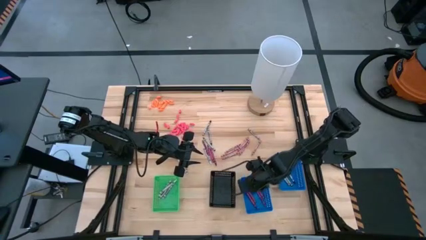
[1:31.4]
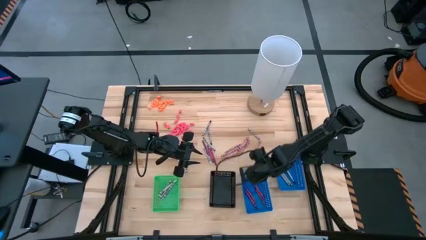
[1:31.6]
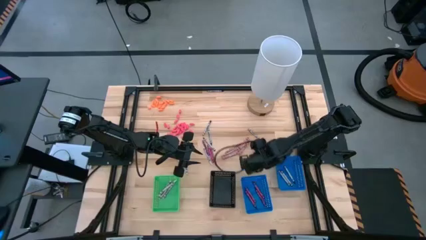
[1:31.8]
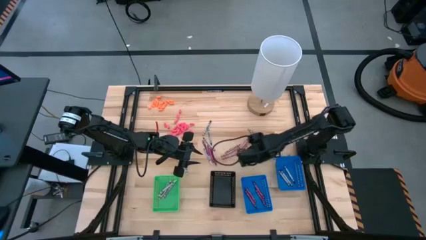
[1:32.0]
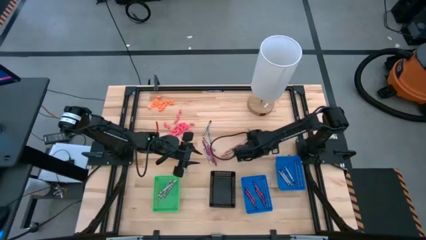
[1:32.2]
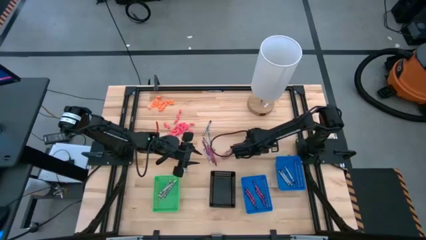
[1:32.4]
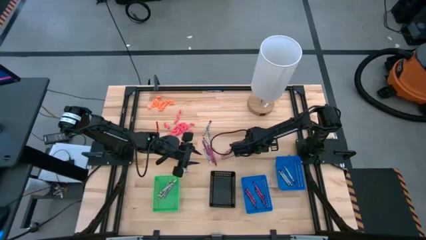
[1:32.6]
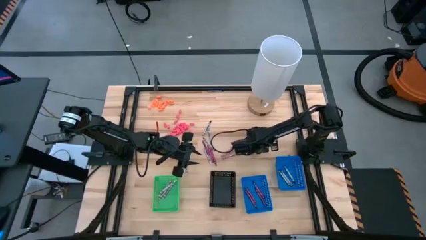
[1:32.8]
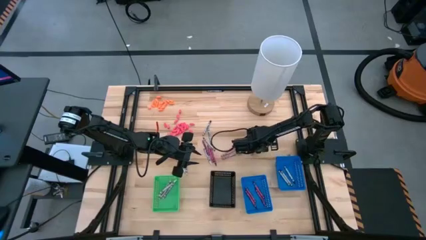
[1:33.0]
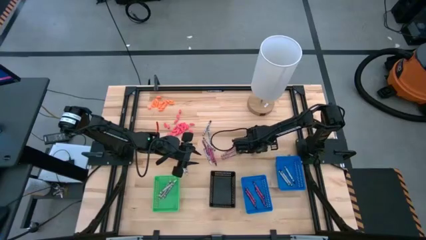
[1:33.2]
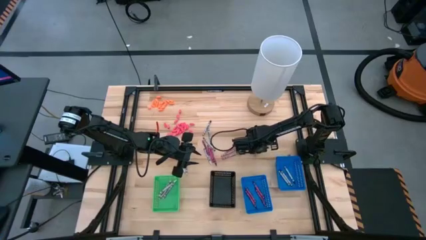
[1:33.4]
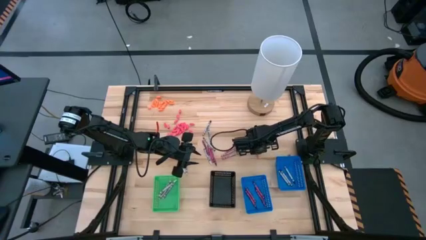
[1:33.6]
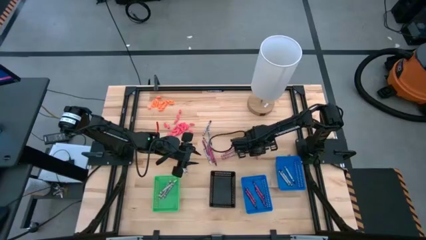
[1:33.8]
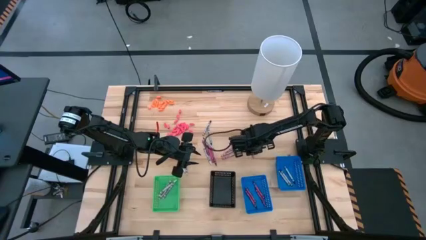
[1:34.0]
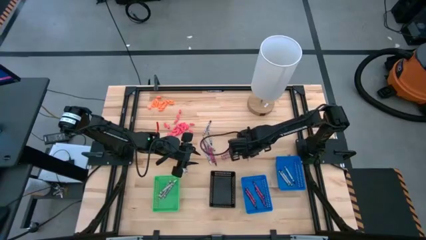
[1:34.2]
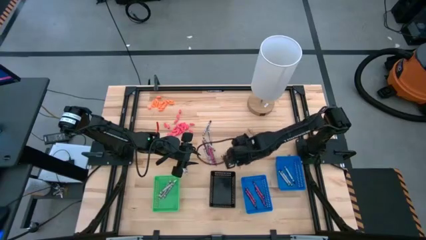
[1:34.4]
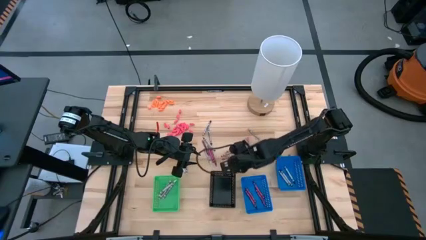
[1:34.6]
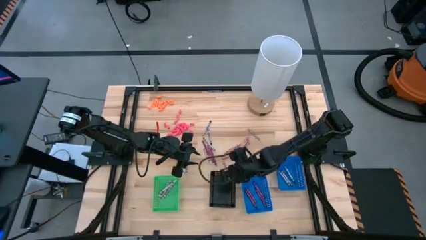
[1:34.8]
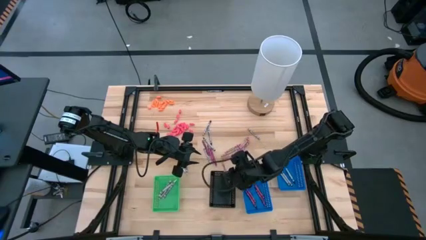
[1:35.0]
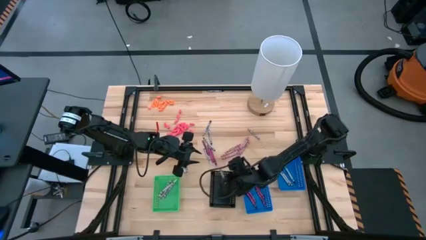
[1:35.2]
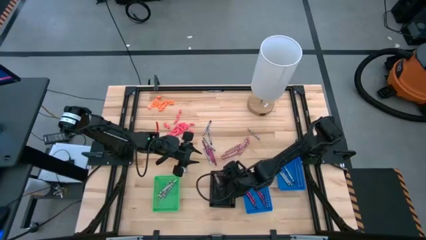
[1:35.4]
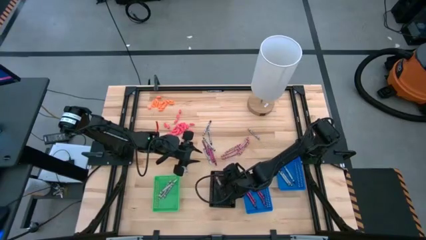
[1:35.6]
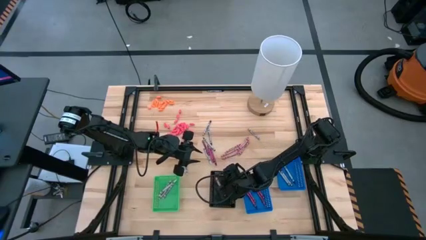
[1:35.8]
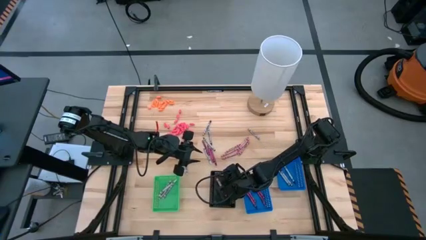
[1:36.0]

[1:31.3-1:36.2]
Task: Sort crayons
Put the pink crayon into the black bin

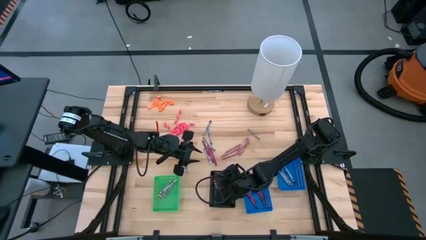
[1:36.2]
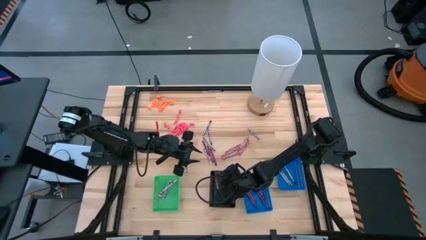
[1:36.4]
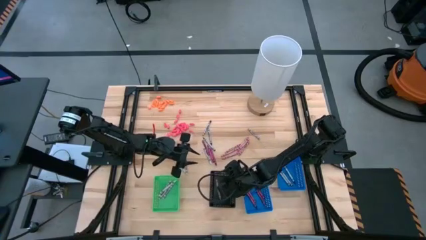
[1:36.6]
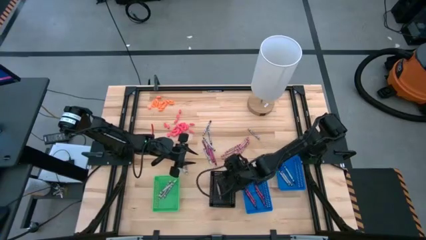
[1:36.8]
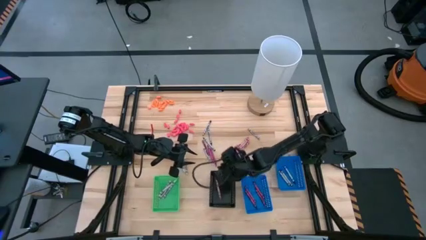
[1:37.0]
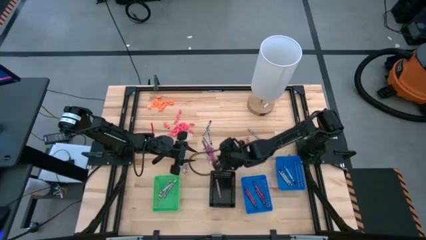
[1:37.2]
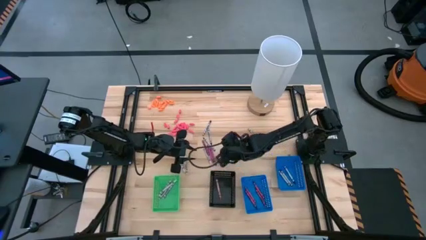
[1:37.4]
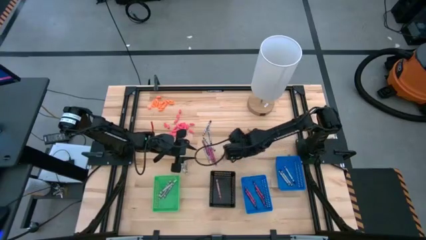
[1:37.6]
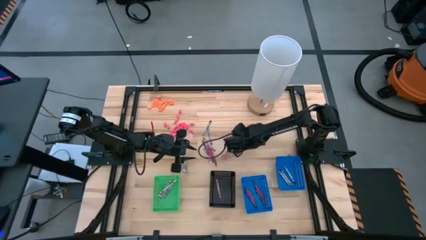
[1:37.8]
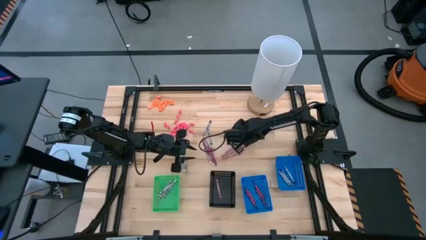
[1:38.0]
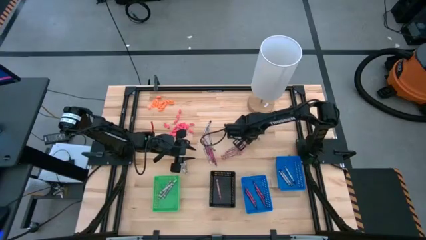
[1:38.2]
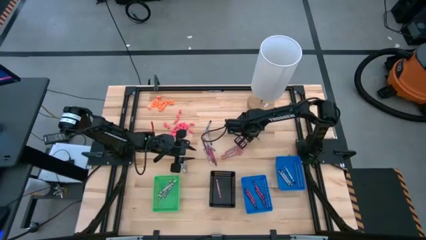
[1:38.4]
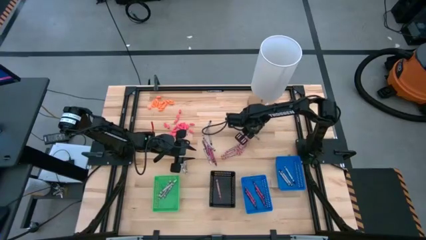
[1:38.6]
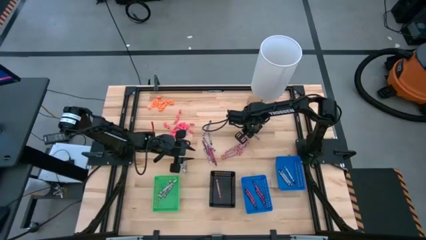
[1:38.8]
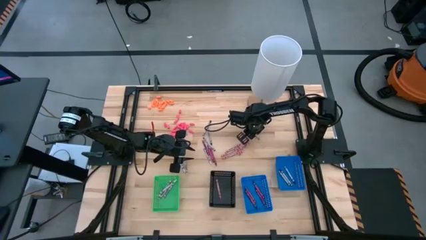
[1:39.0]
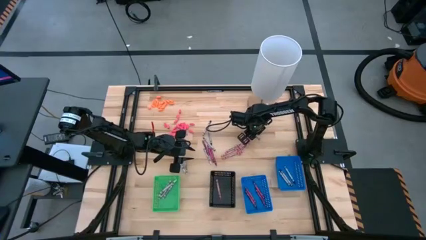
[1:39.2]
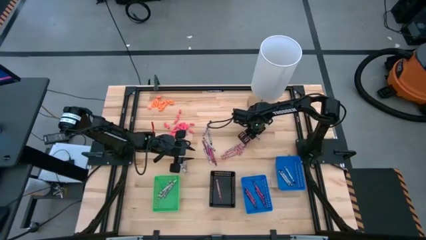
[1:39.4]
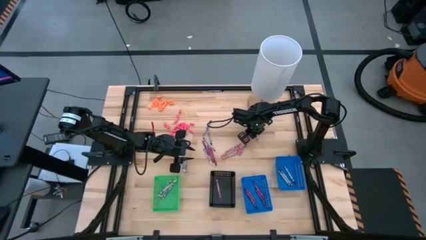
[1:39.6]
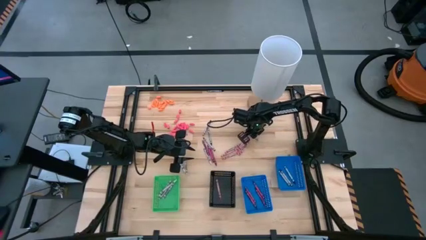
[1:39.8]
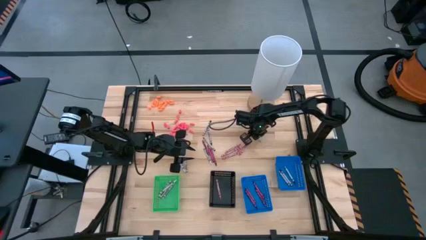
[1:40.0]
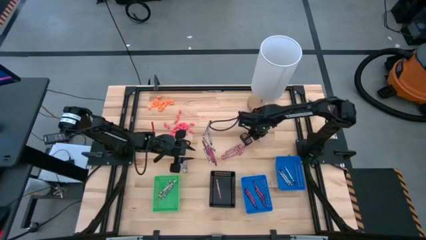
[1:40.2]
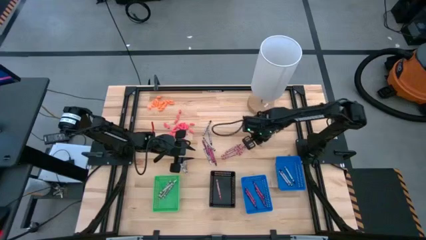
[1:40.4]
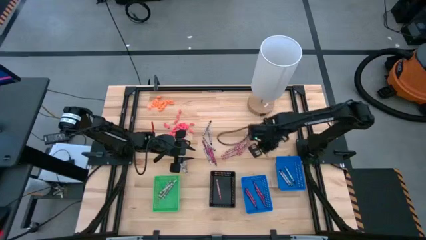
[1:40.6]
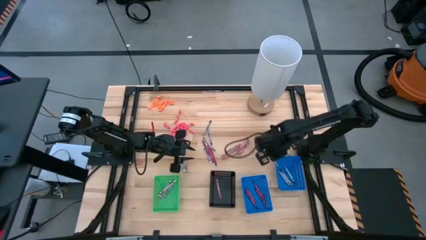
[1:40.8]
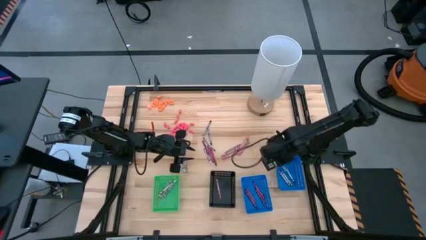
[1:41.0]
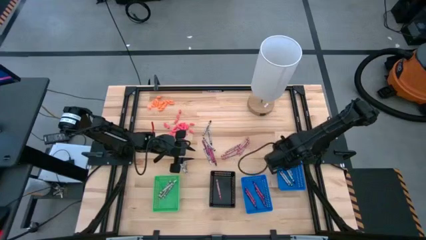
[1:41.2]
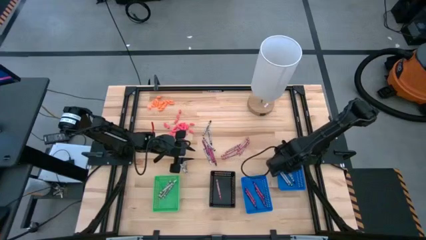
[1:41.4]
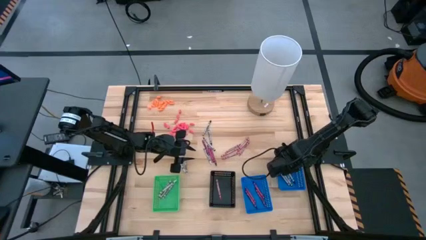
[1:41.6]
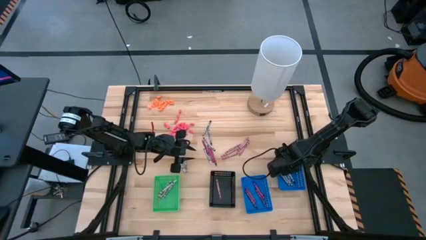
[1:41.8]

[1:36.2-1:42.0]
Put the black crayon into the right blue bin

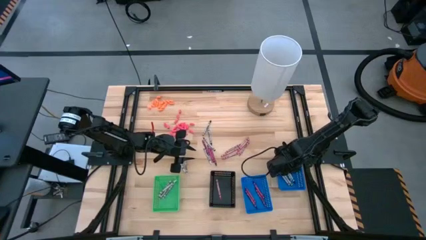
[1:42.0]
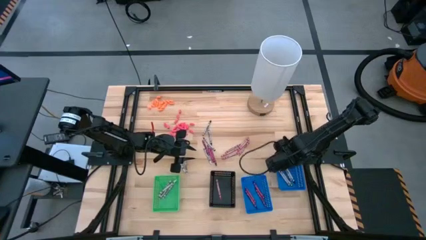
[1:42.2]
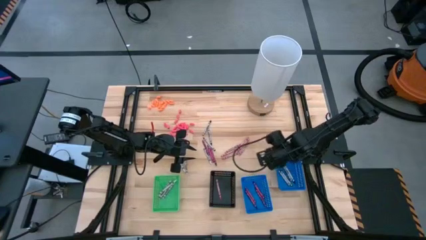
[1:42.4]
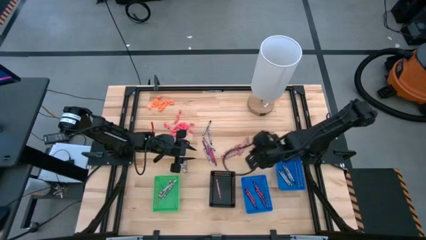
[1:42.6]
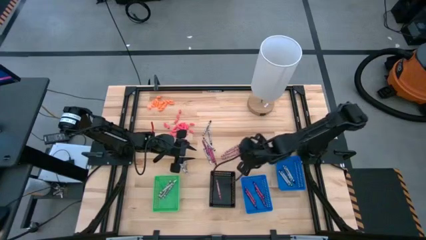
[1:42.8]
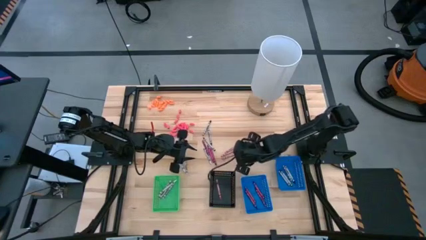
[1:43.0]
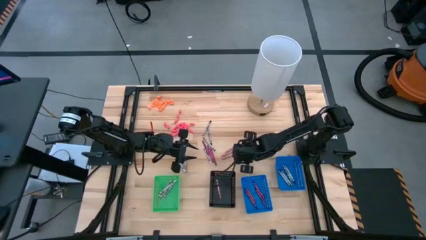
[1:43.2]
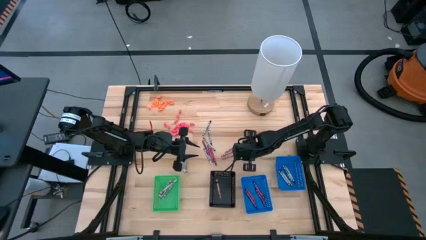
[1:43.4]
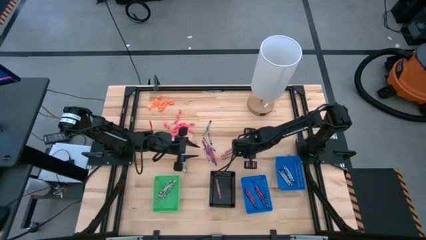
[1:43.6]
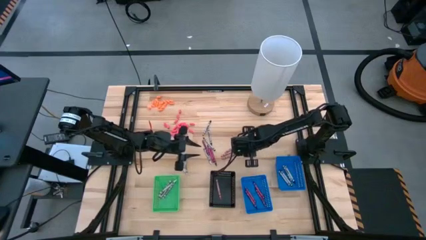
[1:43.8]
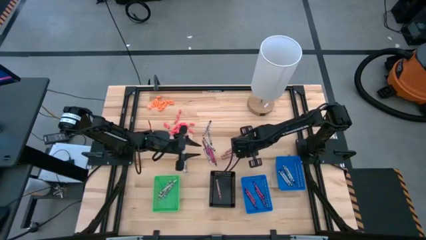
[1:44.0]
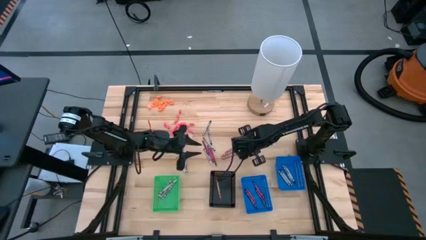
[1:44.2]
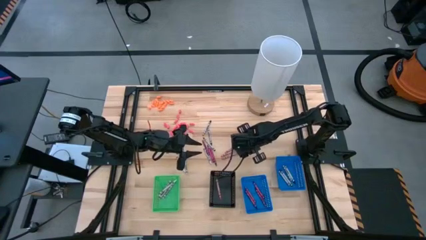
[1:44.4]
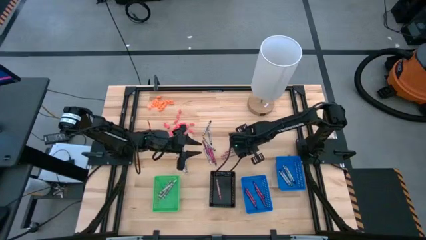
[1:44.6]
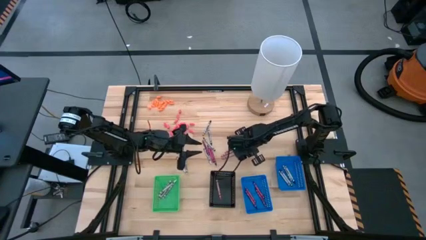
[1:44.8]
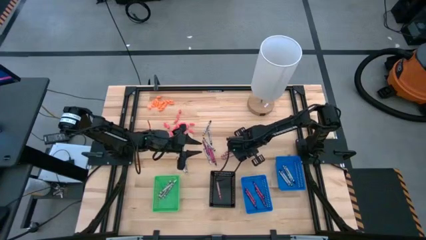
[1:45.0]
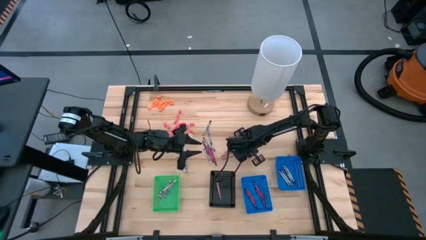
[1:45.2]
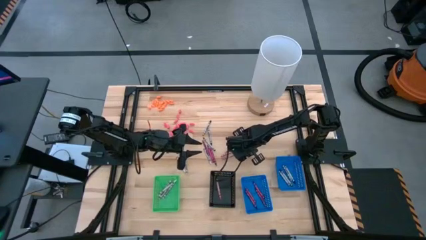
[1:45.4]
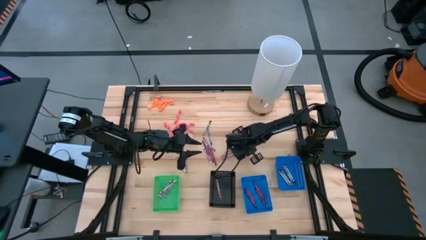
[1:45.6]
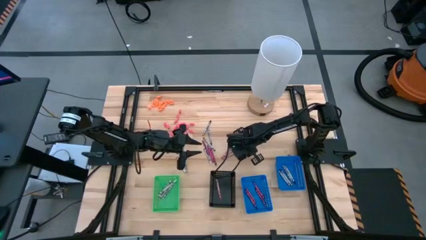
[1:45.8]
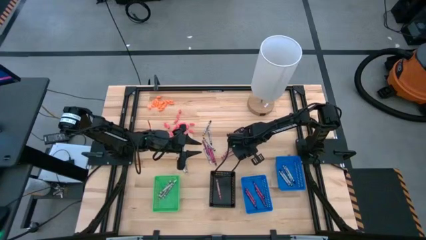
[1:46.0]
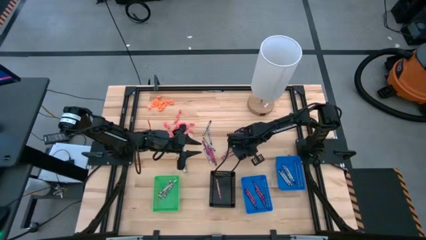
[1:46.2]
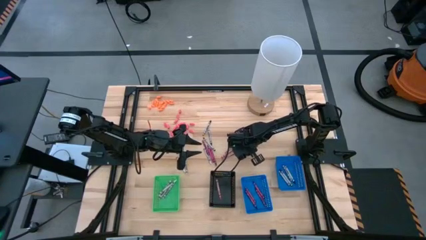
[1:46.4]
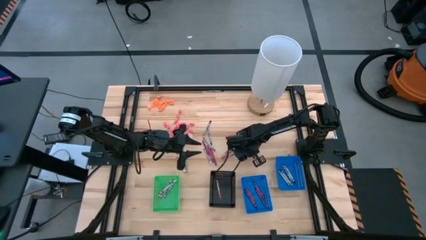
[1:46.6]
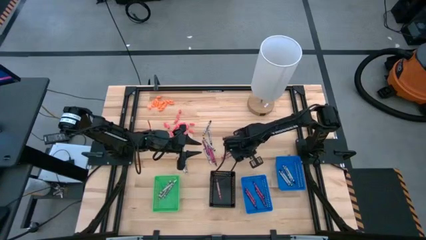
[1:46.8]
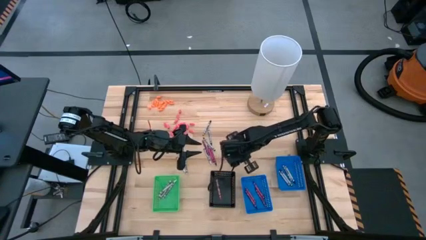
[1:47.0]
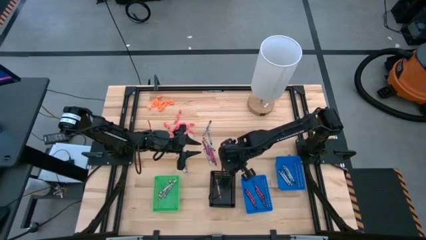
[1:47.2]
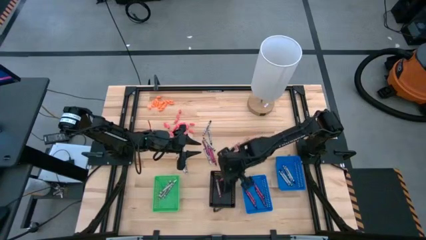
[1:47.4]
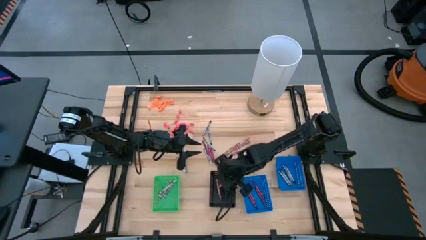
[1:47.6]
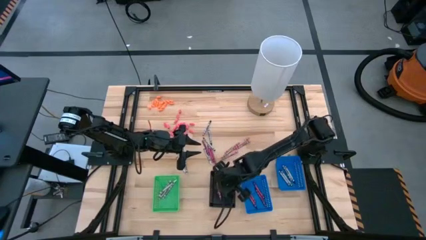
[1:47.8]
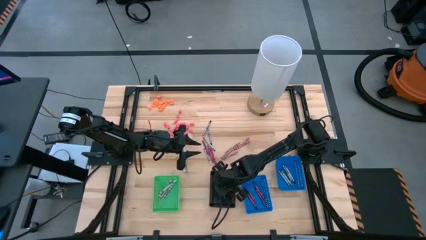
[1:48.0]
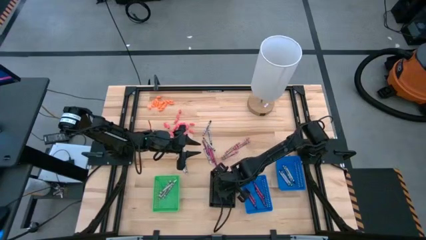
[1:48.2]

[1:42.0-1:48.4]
Put the pink crayon into the black bin
